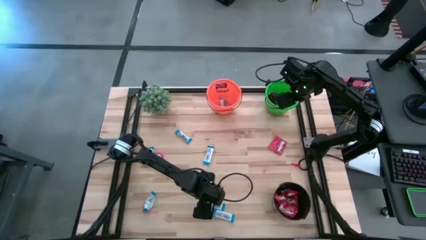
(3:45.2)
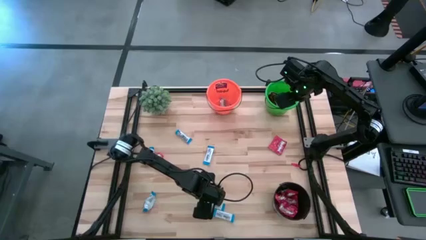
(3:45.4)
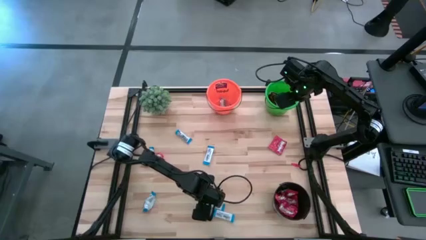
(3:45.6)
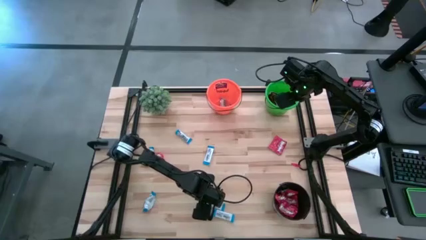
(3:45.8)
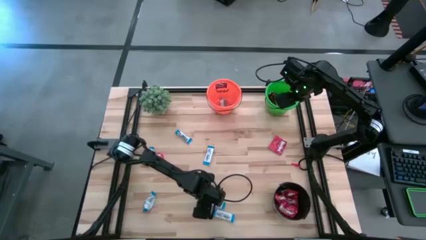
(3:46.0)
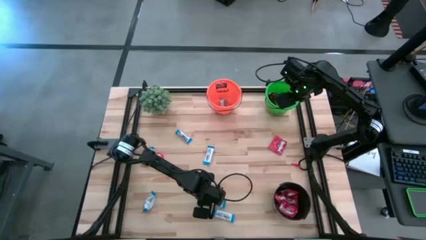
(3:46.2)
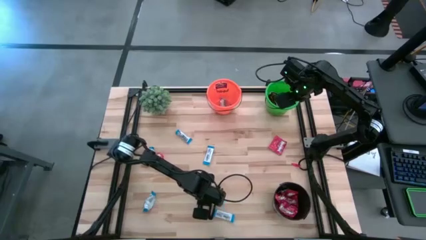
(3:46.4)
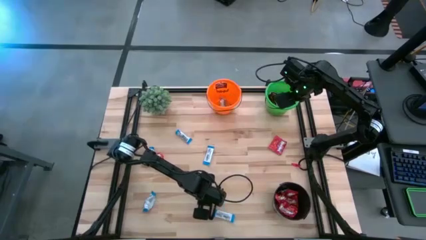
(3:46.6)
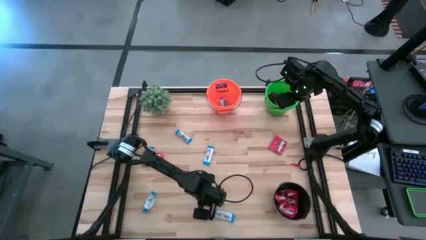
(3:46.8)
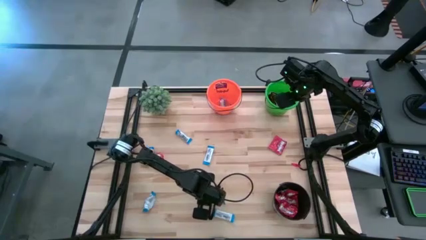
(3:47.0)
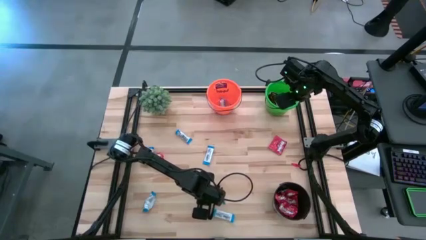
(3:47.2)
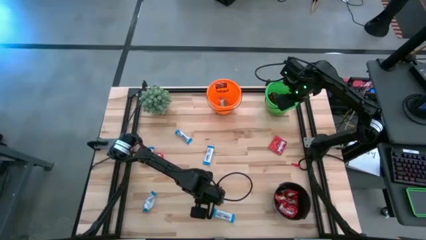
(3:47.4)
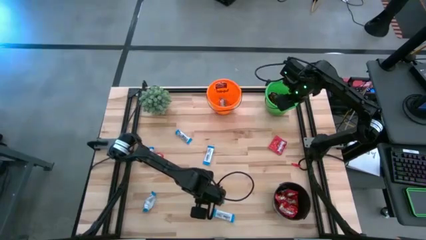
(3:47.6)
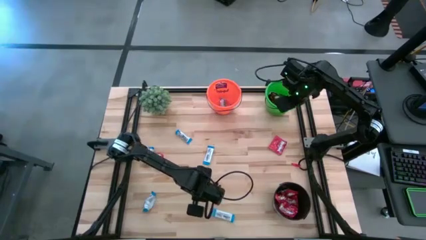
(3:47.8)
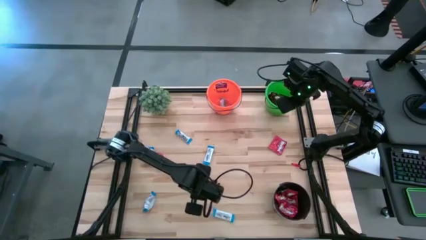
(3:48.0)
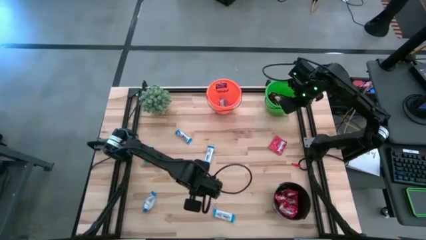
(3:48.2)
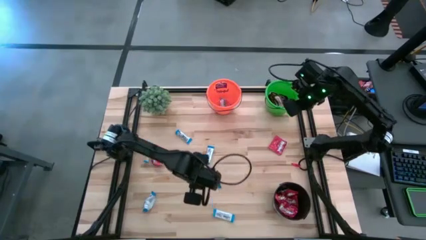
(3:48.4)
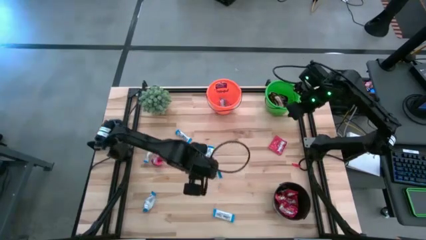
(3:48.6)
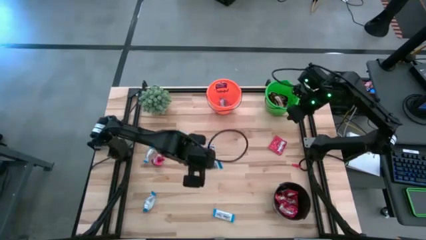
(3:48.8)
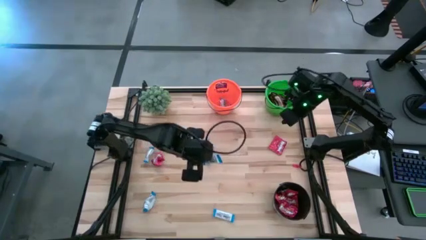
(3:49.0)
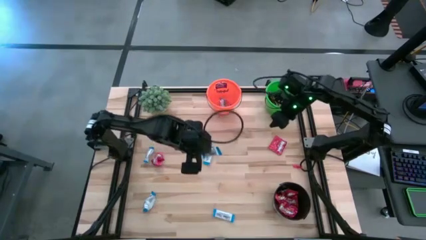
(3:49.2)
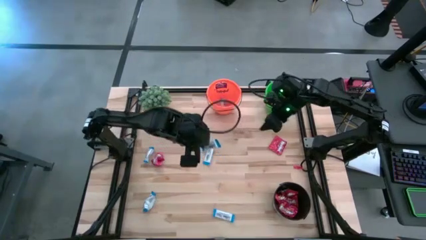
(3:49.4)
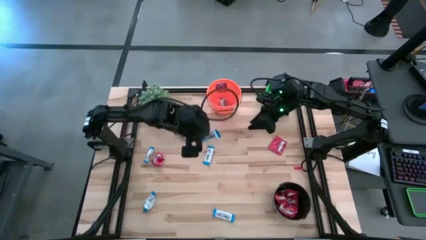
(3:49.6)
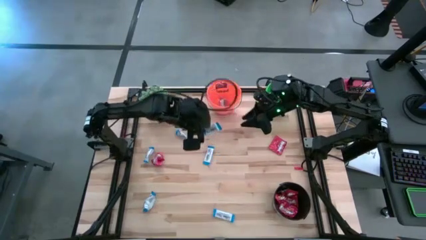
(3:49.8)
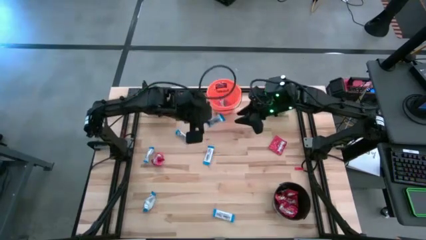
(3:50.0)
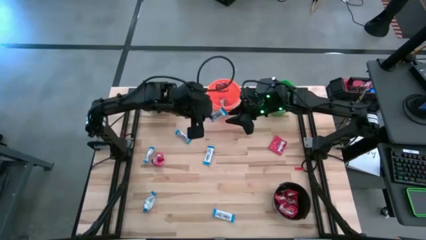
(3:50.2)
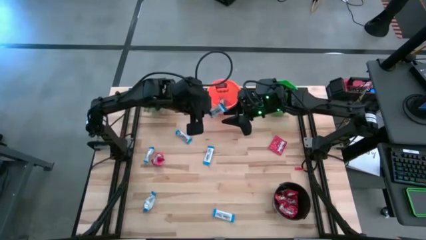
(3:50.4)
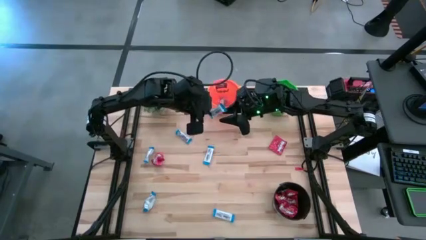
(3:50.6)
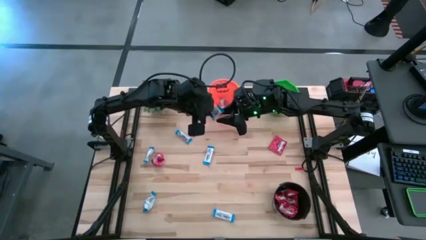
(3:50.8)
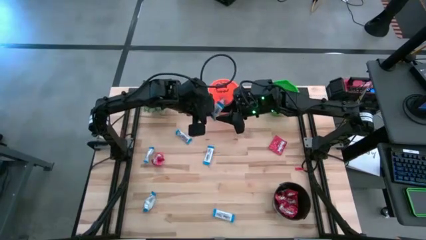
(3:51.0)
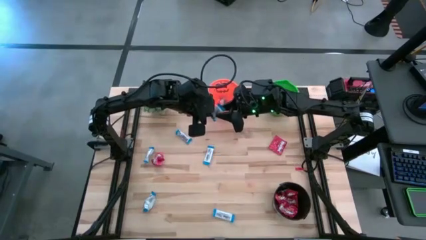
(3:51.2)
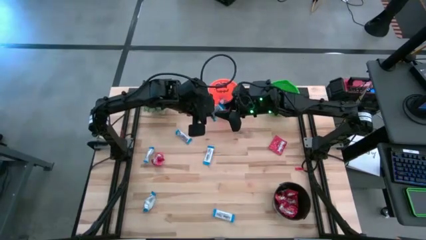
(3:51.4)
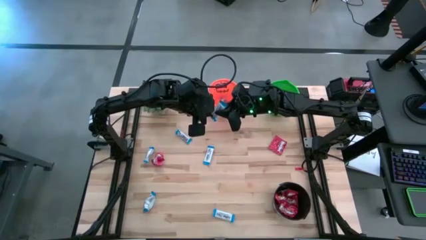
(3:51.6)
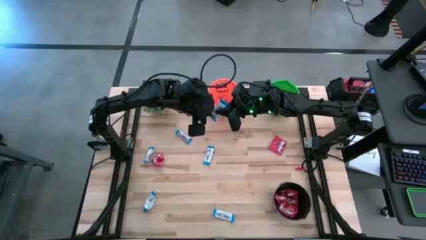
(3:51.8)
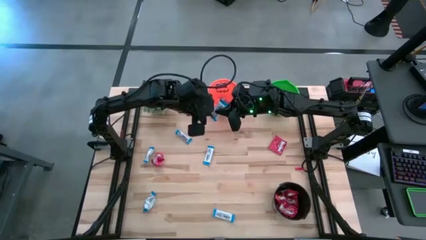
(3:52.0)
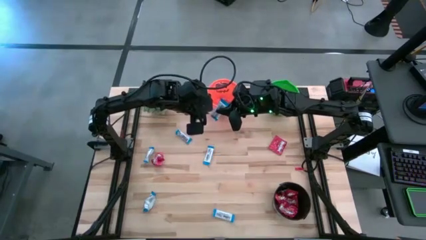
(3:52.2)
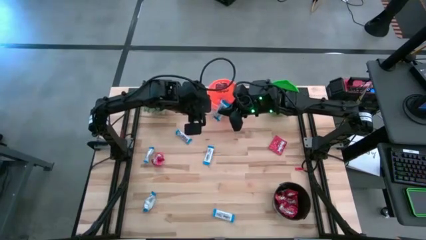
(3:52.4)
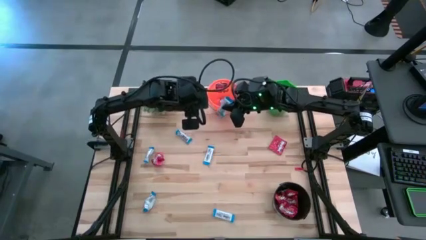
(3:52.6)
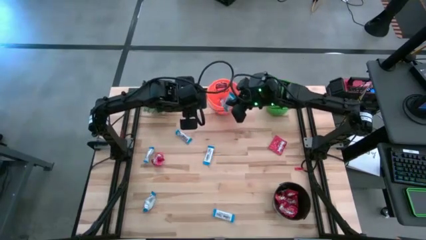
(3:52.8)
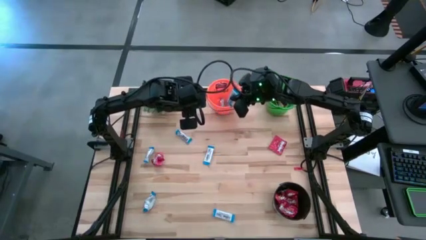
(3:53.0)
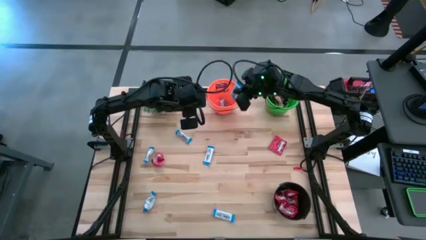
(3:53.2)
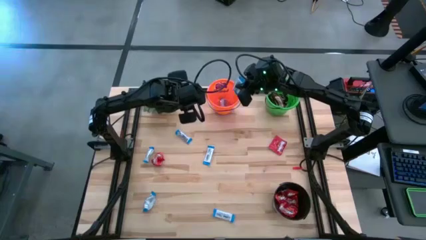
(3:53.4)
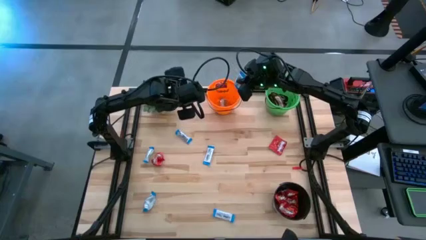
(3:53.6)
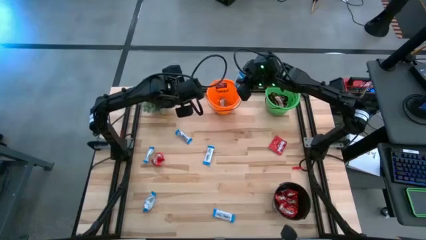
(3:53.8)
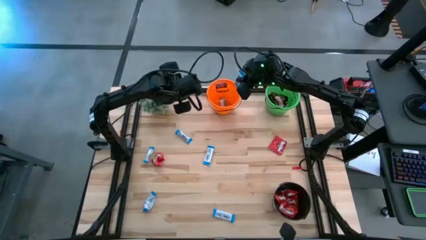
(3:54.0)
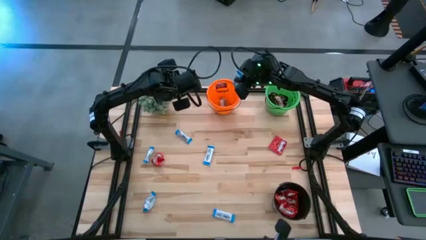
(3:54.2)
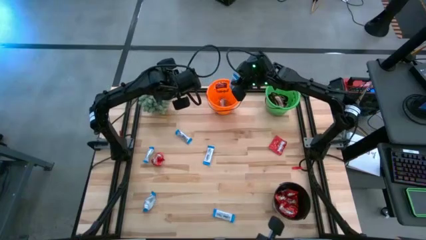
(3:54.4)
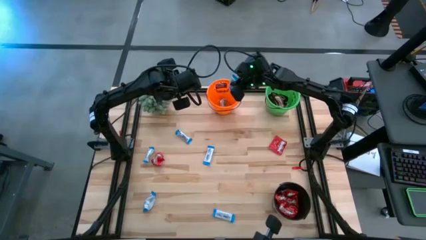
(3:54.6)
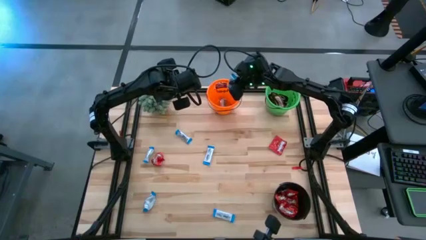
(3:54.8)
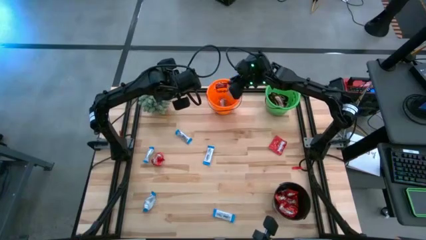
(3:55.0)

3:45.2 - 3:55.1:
Task: Organize candy in baskets
Put the white chocolate into the orange bucket

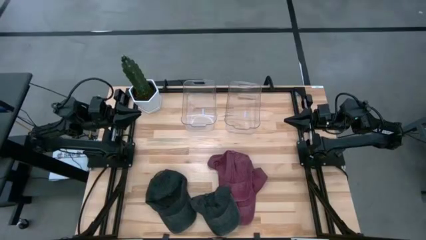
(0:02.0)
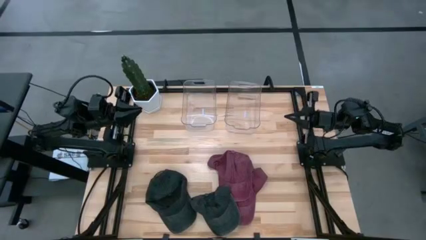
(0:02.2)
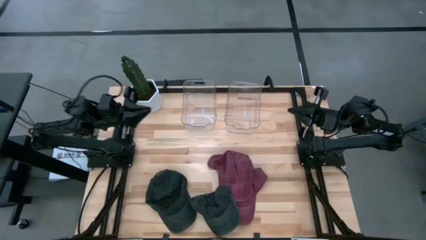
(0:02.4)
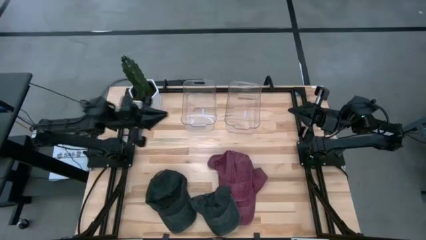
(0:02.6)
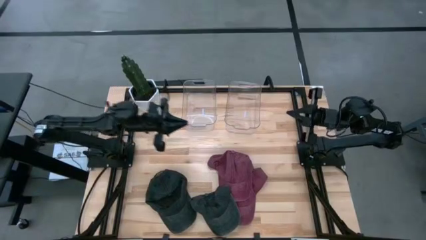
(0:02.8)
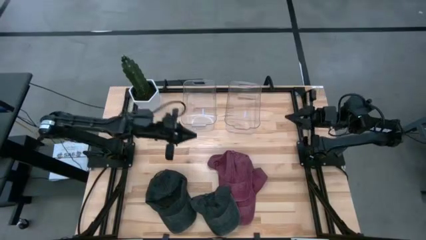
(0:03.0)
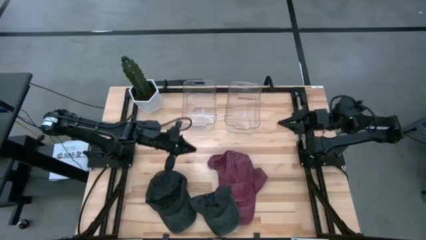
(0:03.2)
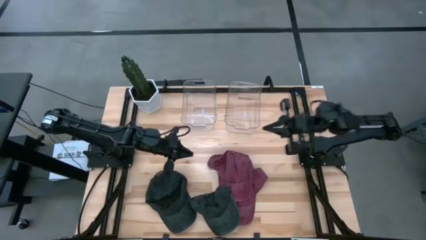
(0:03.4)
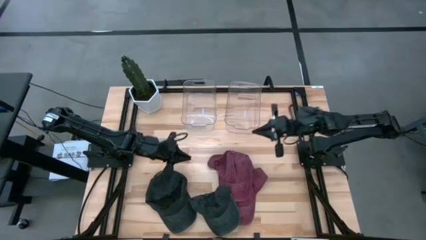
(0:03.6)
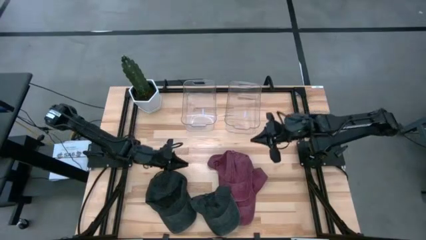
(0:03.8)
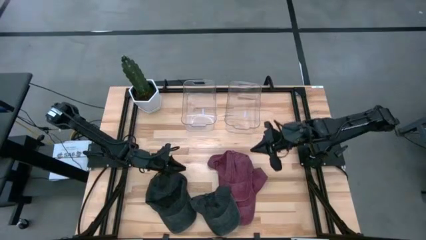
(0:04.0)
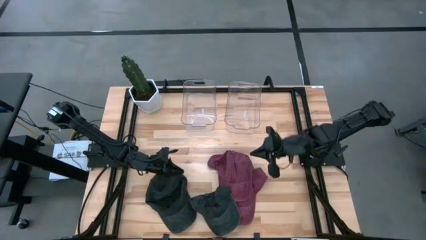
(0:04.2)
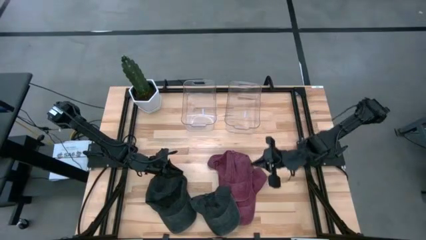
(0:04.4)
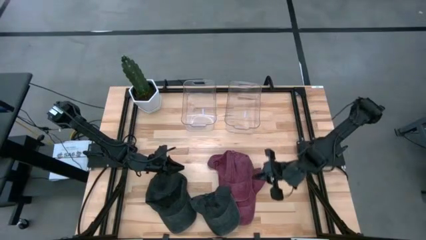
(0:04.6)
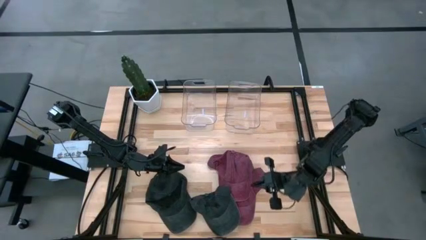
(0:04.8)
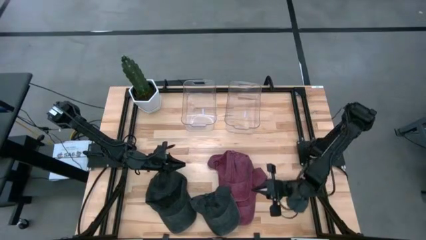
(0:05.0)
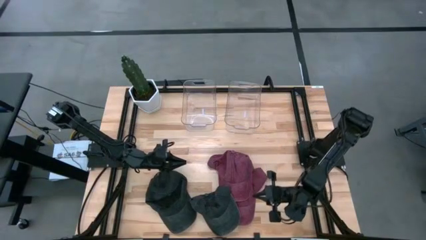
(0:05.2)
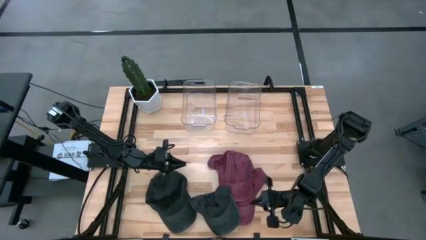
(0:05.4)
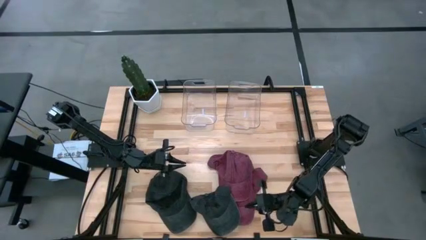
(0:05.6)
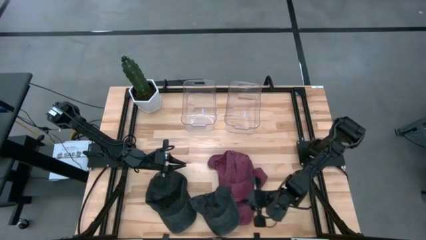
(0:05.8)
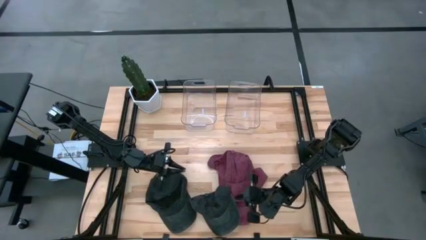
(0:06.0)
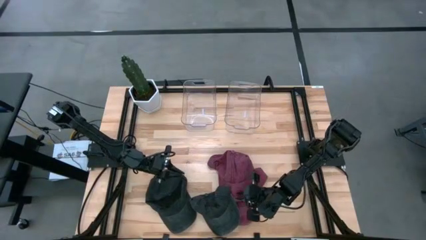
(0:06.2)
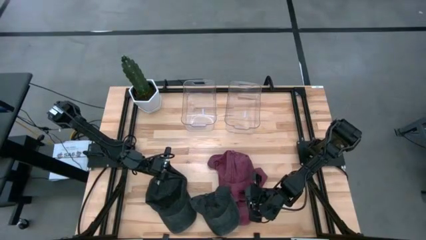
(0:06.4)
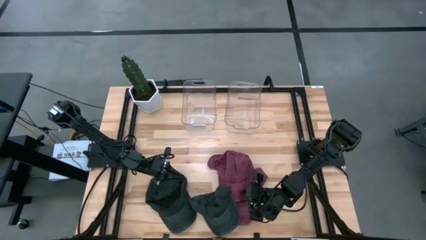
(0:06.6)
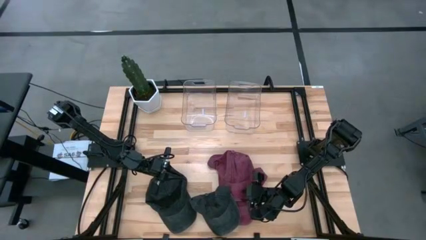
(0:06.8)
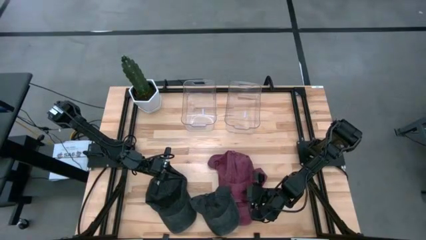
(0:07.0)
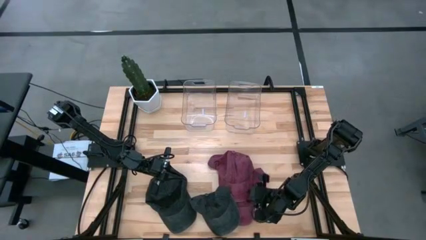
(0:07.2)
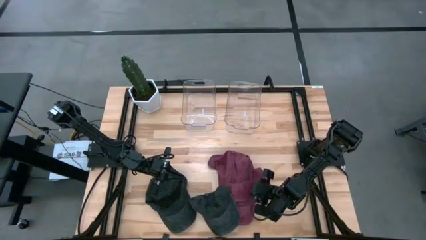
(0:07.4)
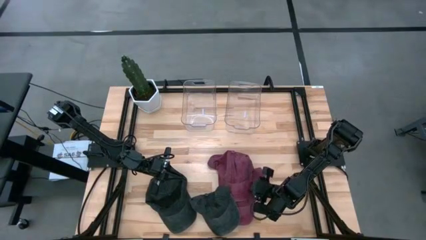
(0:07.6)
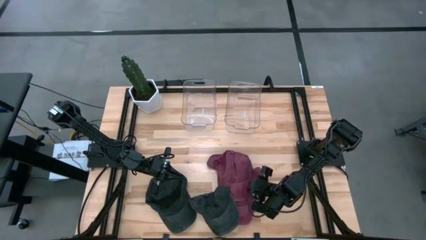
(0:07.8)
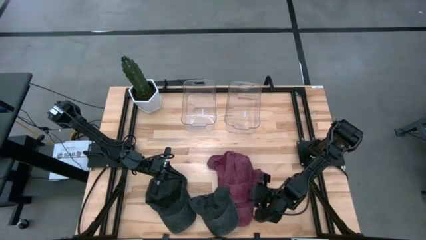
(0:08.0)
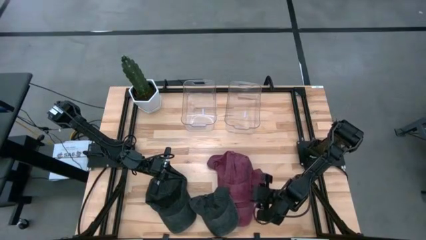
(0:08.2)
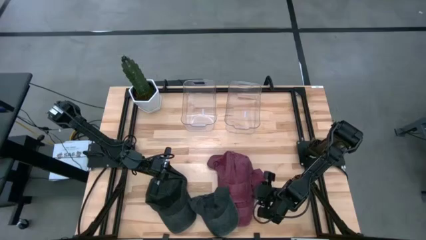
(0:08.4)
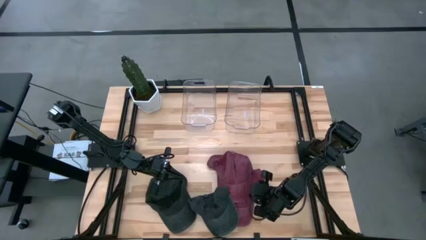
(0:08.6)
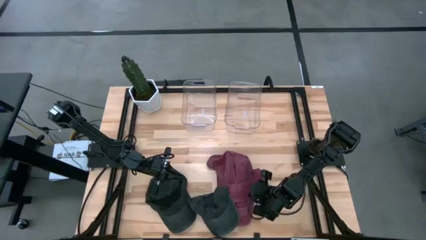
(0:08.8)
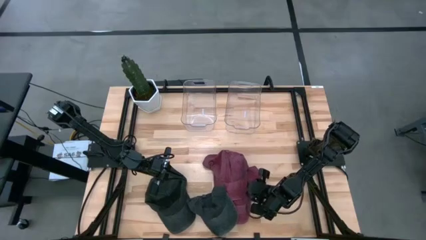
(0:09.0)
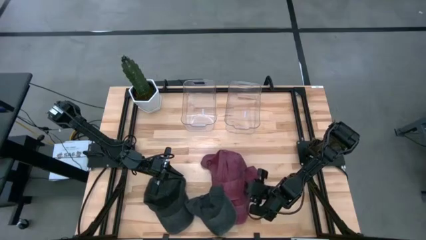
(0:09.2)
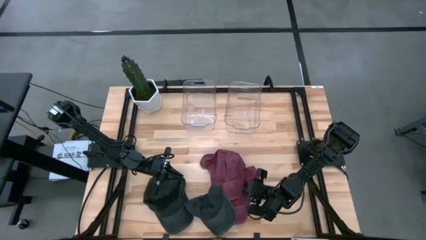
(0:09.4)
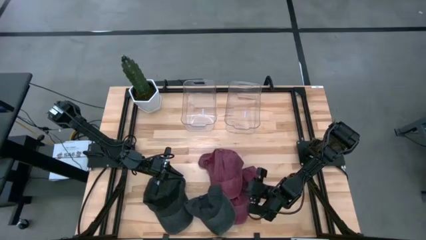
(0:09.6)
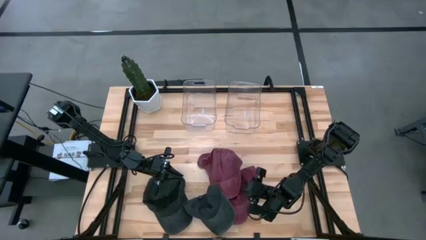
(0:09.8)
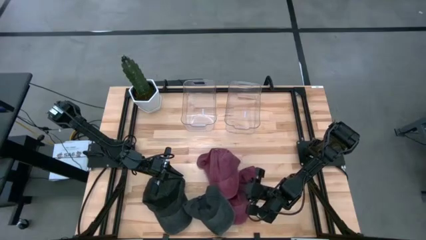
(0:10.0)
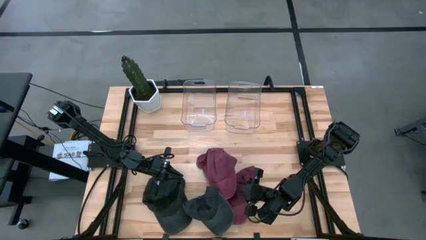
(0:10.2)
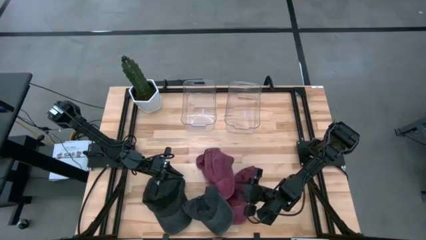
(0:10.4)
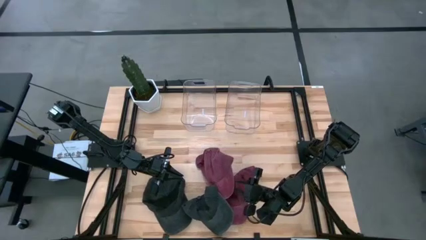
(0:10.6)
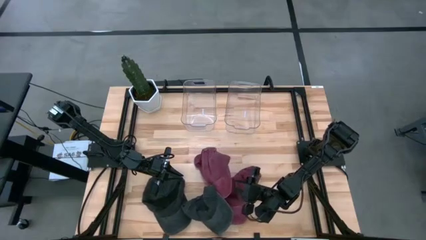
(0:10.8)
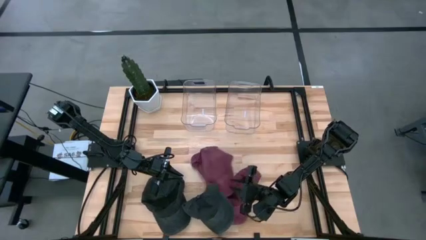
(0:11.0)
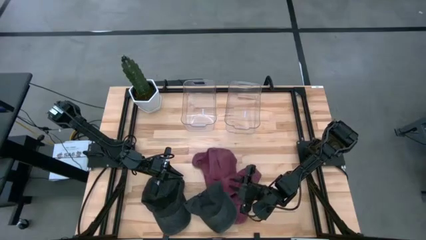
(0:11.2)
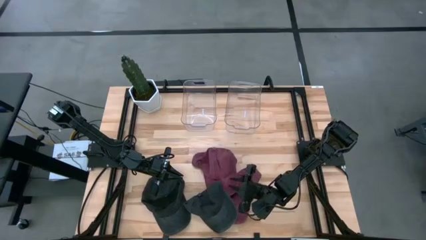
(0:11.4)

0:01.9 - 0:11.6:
Task: Pick & Place hat
Put the top maroon head cap into the right transparent bin
